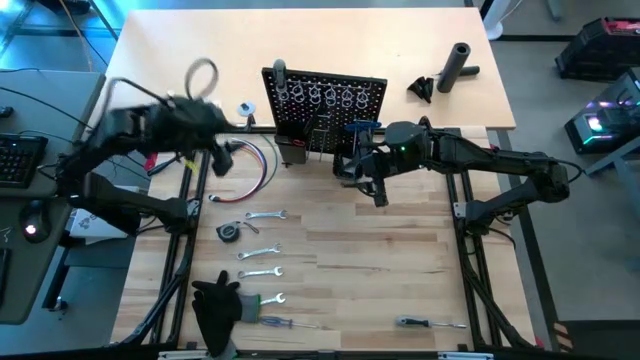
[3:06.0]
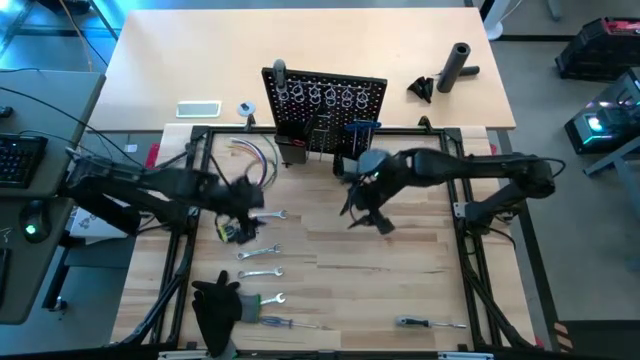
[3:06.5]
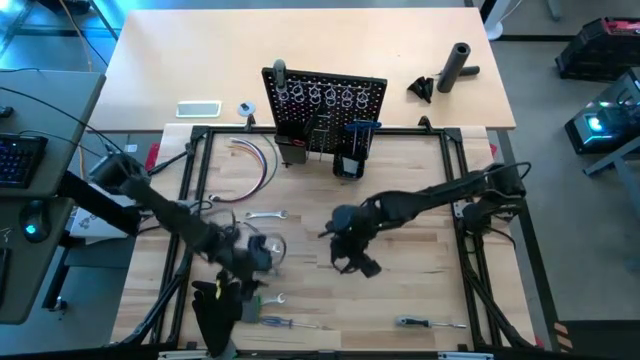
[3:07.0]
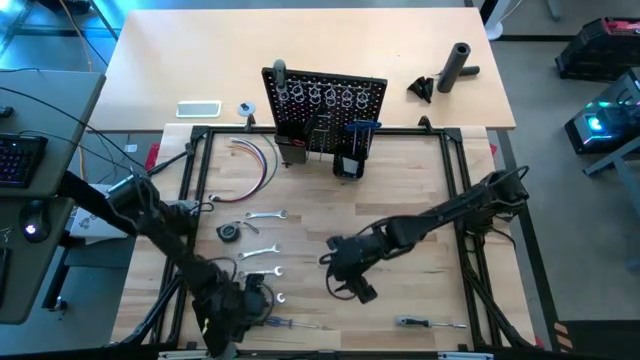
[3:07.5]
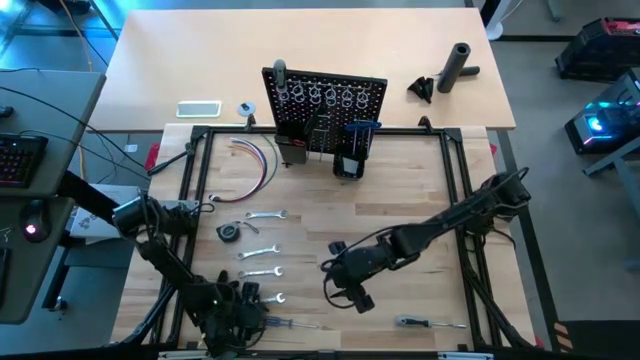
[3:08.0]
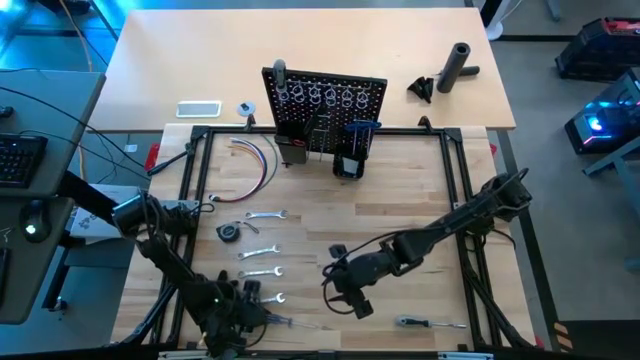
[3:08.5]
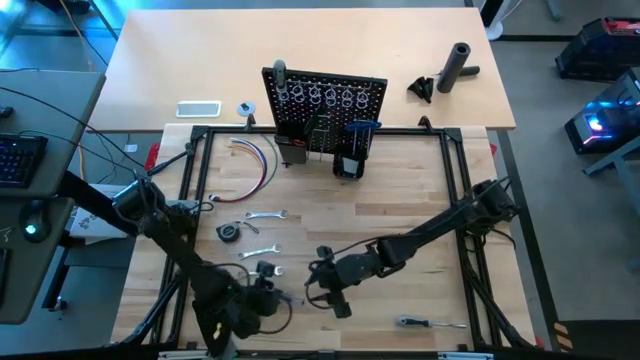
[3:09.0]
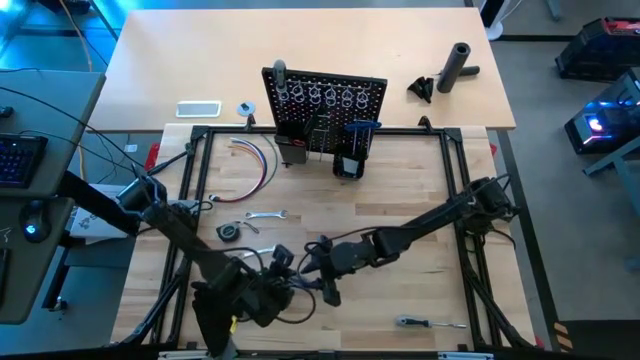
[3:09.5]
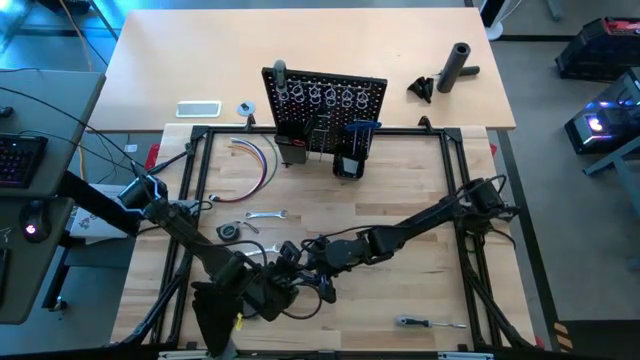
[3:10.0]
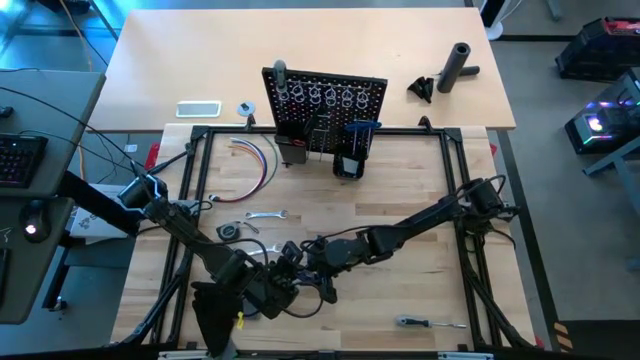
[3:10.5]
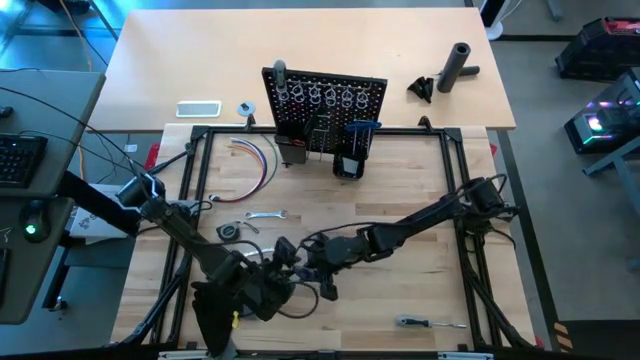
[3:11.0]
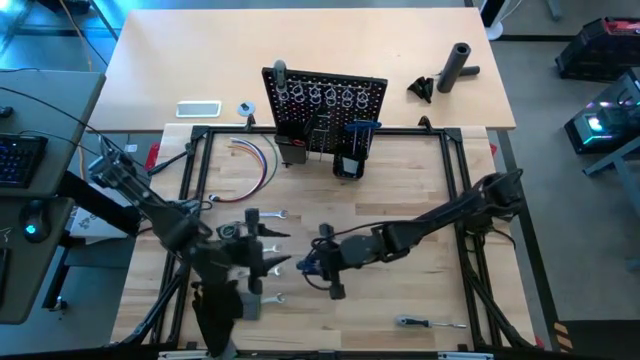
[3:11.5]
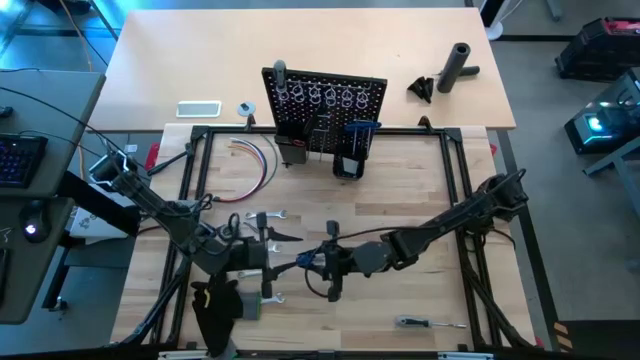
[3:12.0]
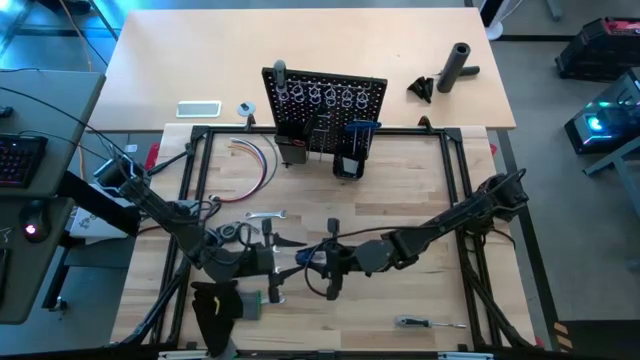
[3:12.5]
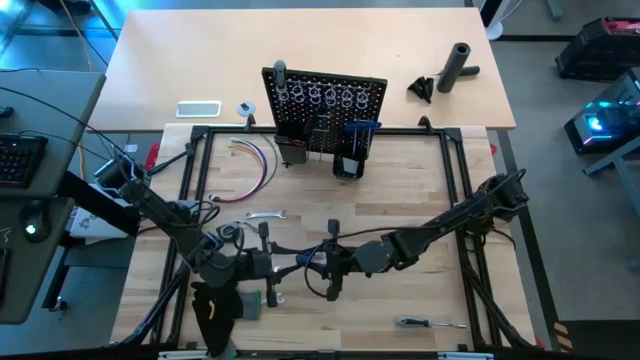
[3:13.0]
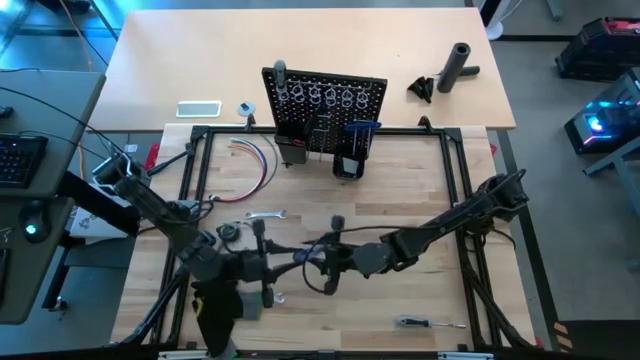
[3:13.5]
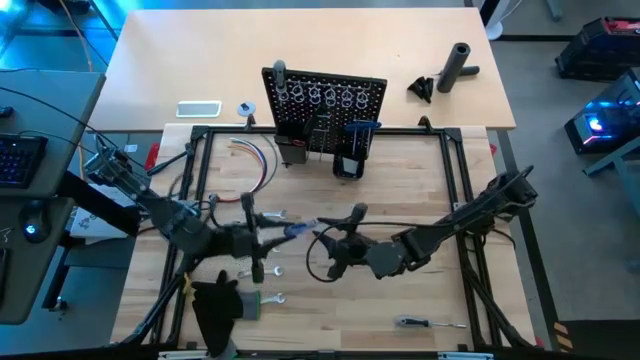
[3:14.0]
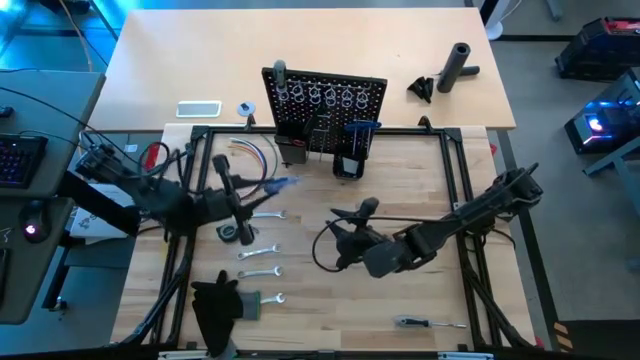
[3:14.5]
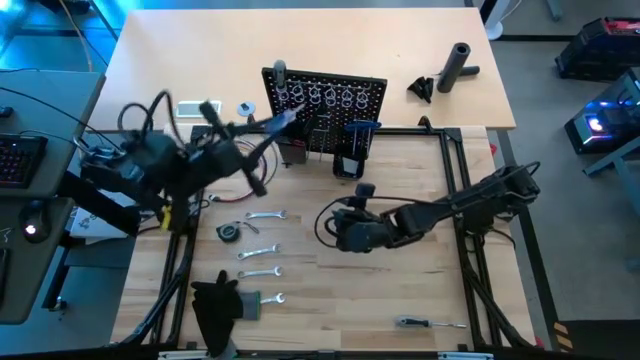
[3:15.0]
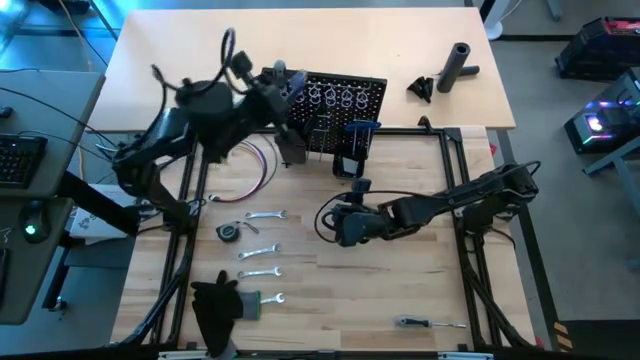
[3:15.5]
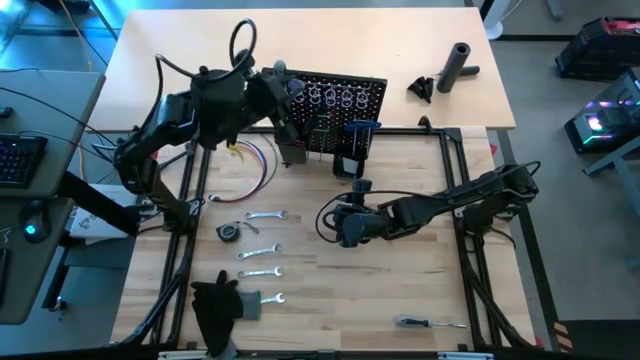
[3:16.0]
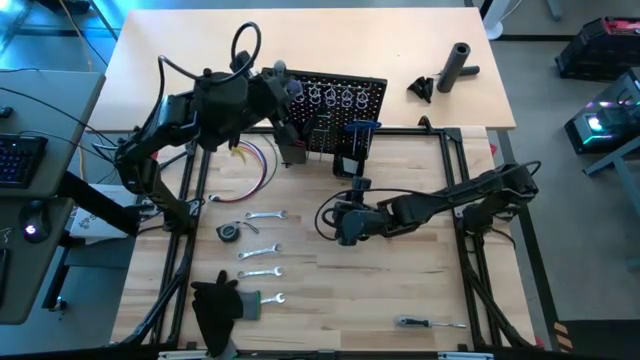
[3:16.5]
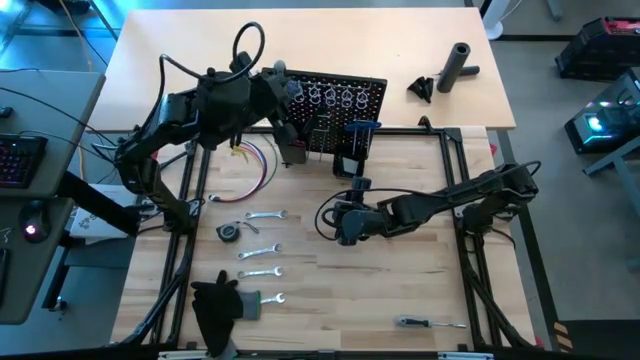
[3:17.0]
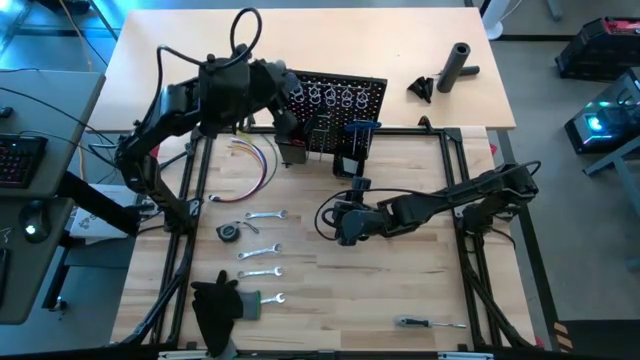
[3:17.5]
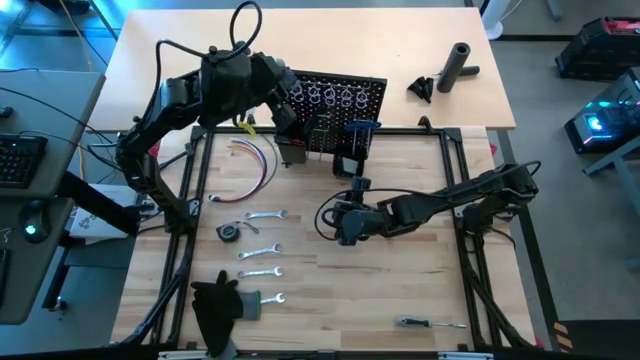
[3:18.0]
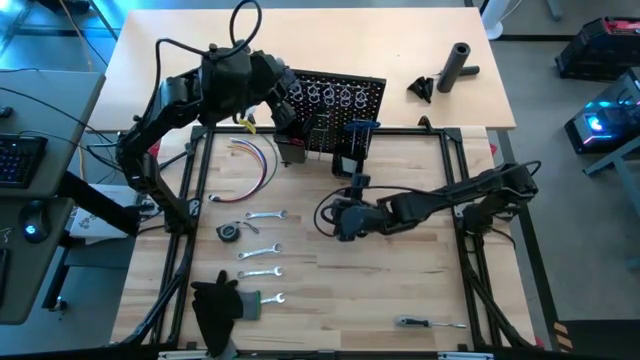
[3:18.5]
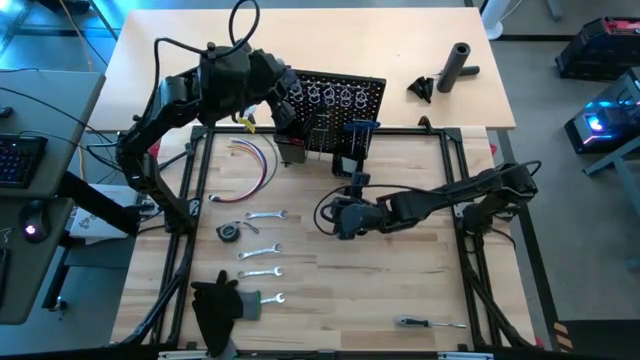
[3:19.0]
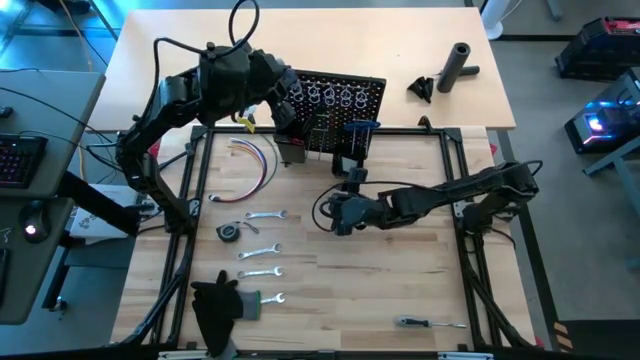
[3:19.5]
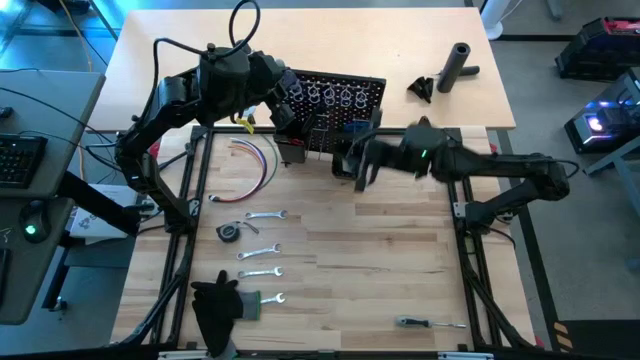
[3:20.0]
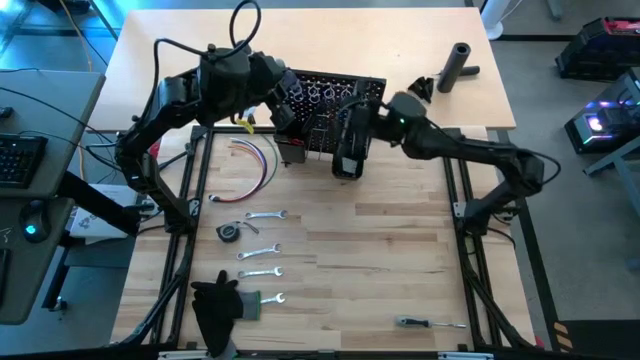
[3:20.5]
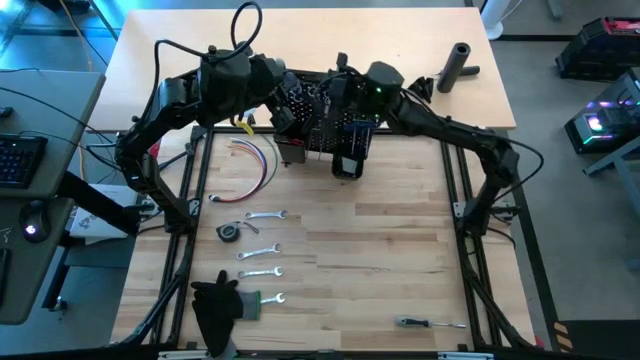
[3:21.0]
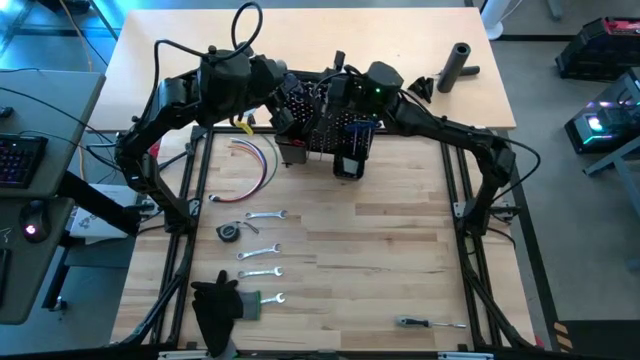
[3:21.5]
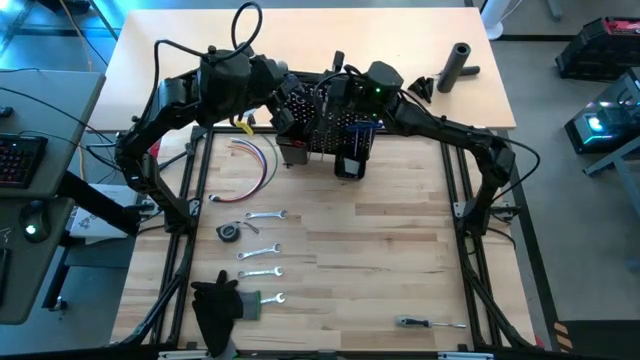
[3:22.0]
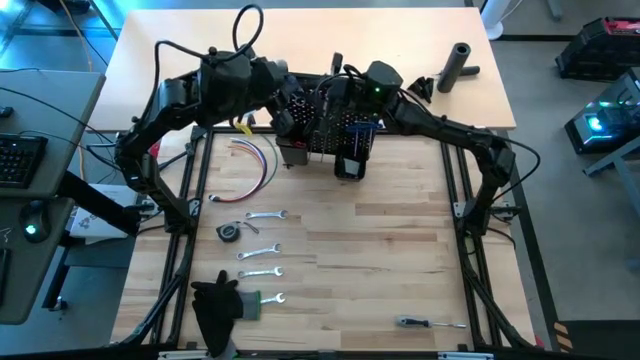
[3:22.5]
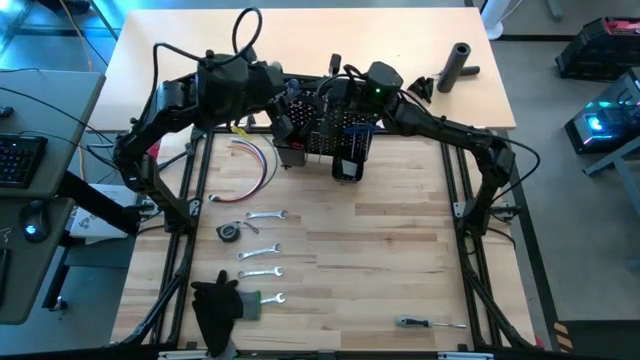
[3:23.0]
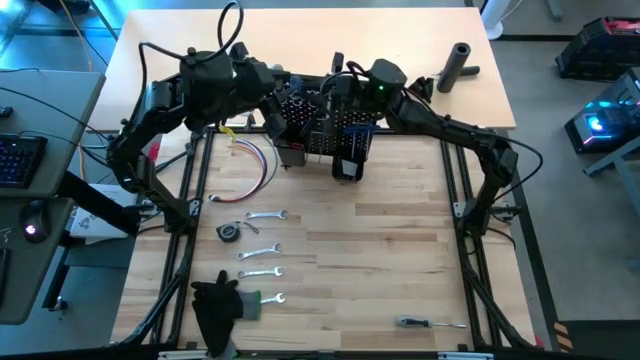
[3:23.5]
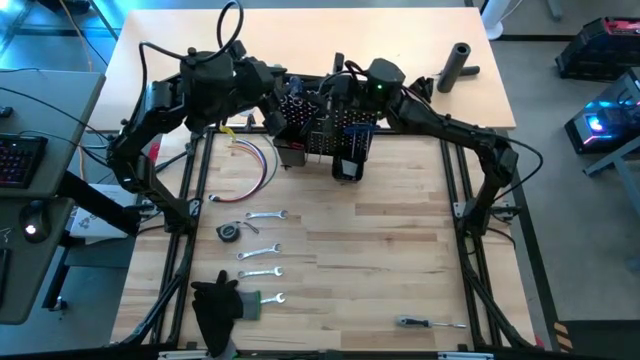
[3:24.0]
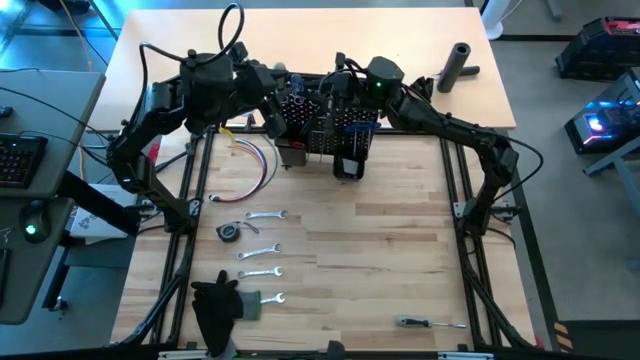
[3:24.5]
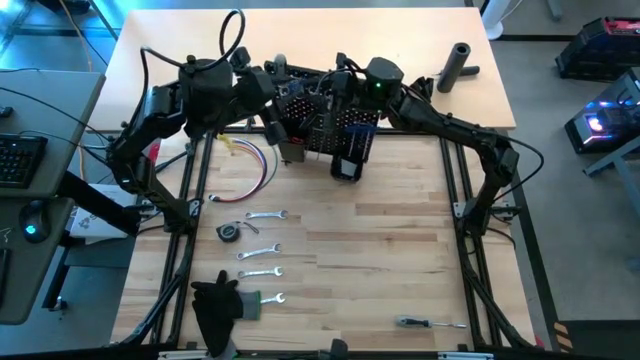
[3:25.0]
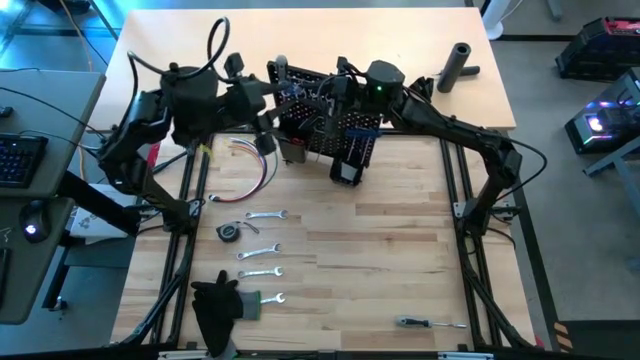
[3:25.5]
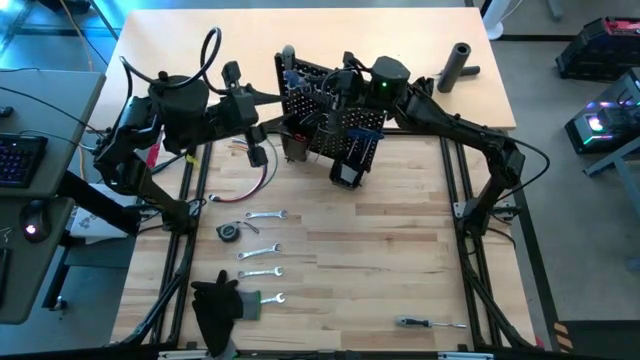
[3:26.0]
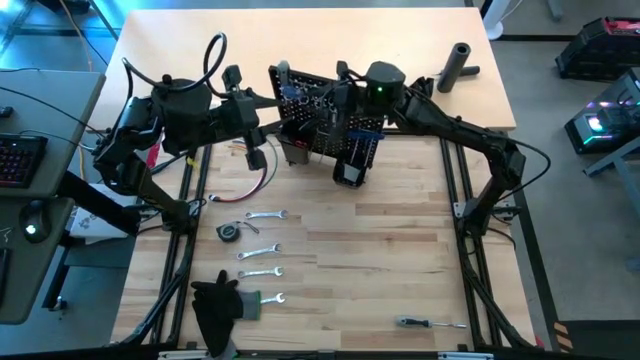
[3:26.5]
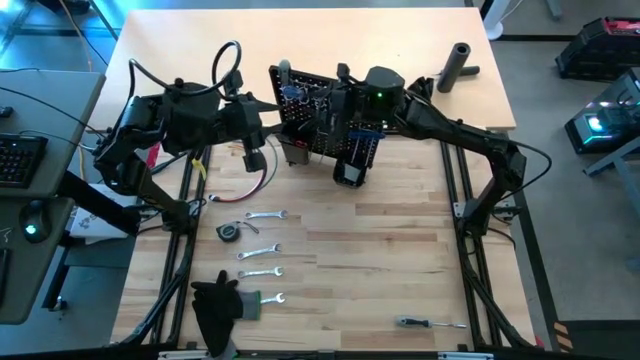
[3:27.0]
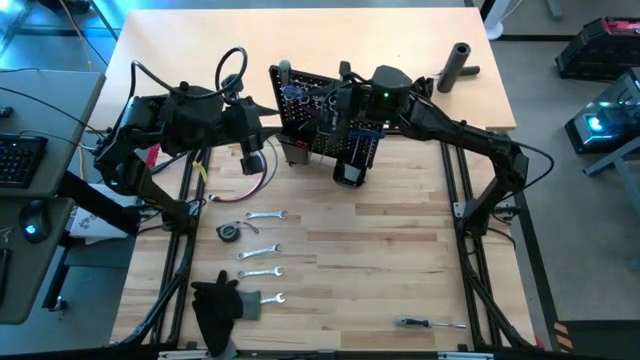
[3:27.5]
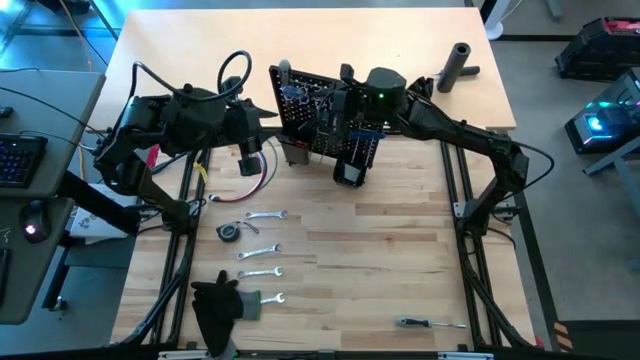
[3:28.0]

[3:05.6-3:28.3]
Task: Hang tools onto peg board
Hang the transparent blue screwdriver on the black pegboard
